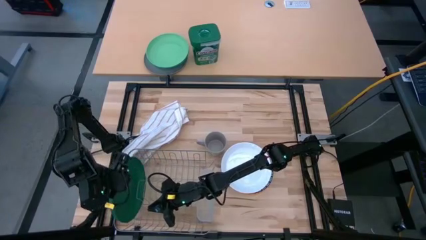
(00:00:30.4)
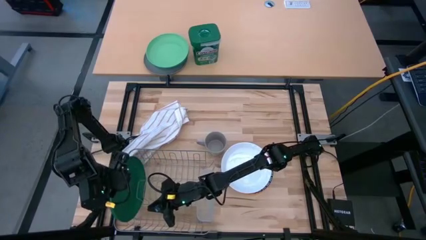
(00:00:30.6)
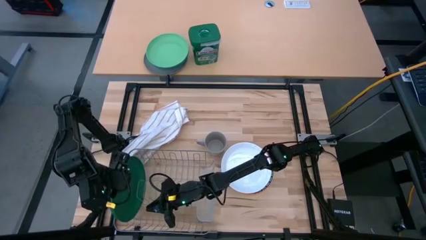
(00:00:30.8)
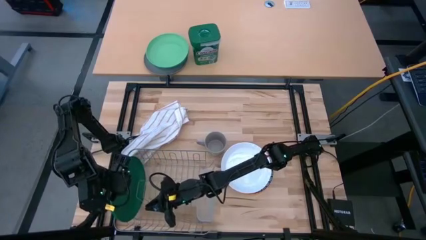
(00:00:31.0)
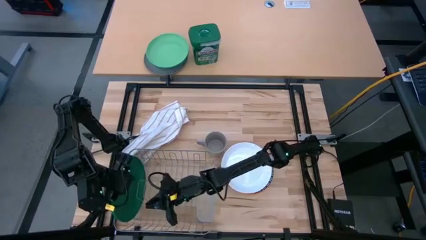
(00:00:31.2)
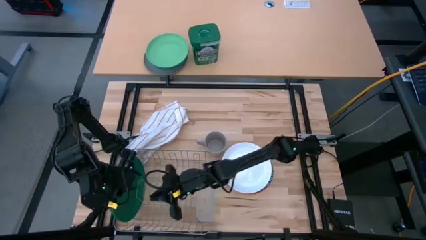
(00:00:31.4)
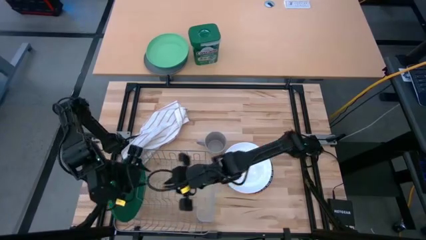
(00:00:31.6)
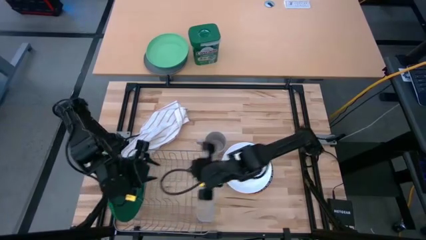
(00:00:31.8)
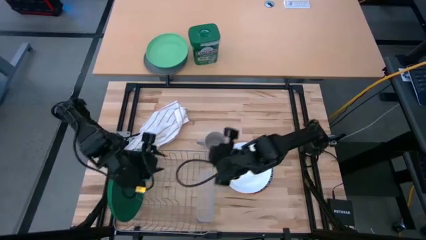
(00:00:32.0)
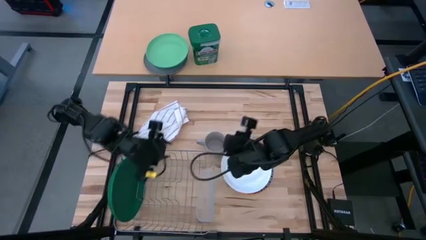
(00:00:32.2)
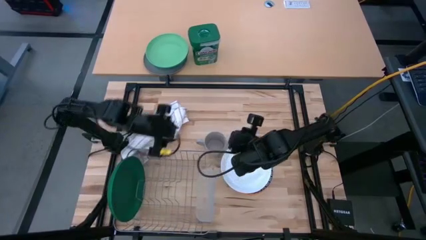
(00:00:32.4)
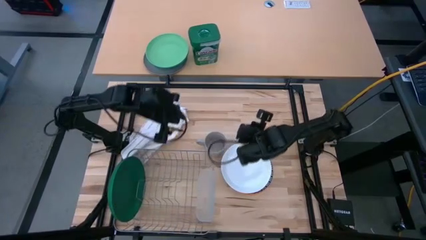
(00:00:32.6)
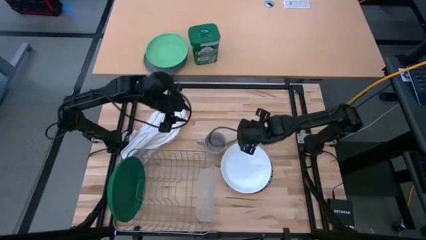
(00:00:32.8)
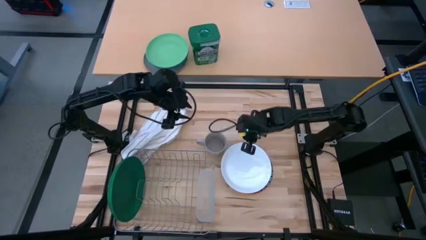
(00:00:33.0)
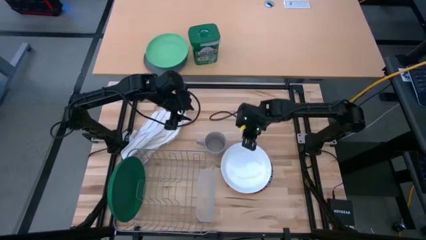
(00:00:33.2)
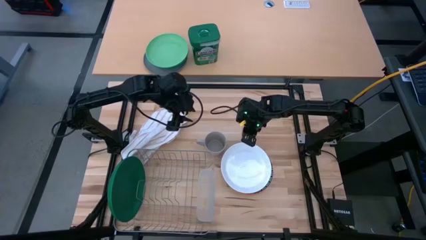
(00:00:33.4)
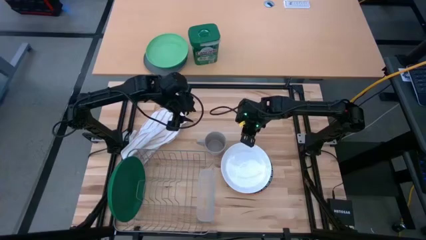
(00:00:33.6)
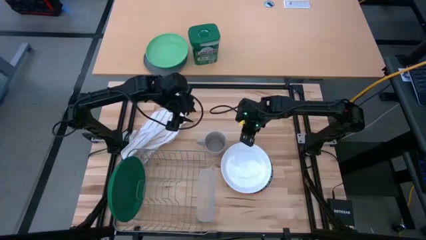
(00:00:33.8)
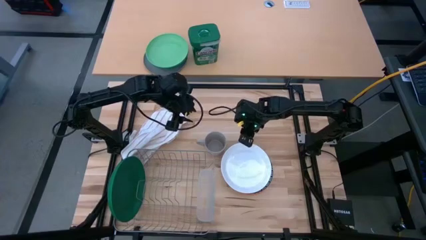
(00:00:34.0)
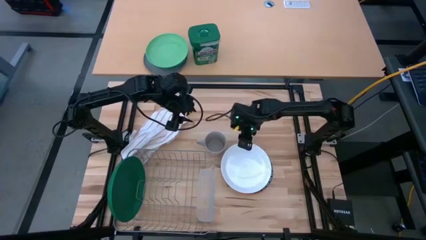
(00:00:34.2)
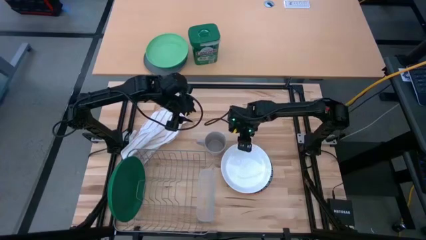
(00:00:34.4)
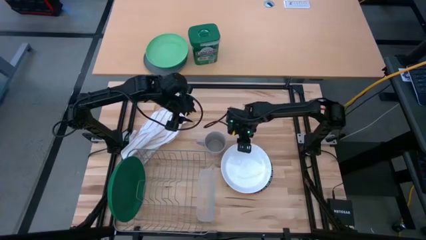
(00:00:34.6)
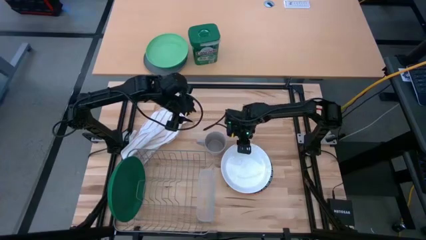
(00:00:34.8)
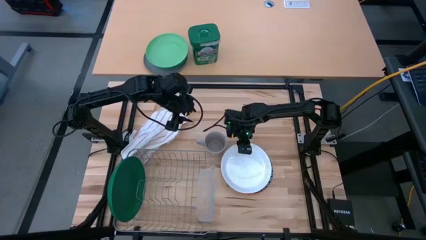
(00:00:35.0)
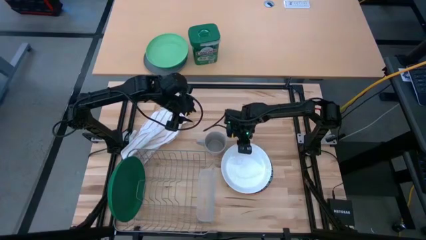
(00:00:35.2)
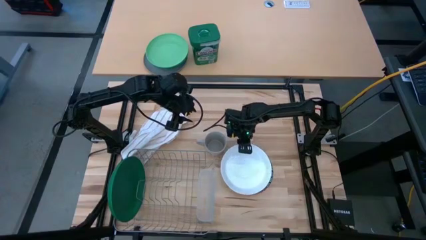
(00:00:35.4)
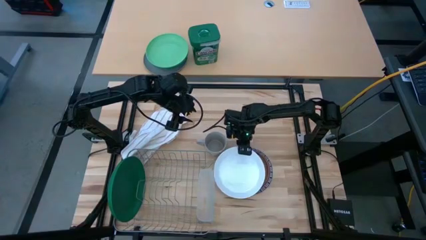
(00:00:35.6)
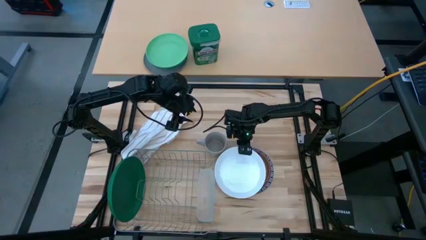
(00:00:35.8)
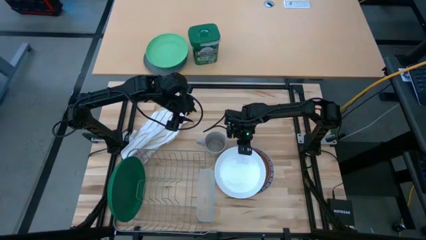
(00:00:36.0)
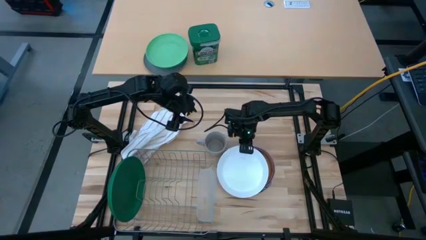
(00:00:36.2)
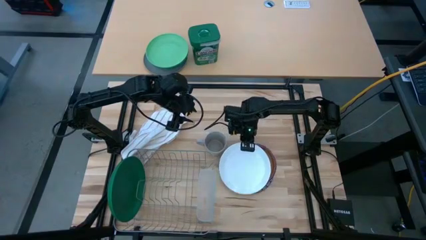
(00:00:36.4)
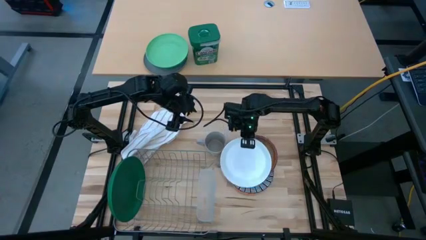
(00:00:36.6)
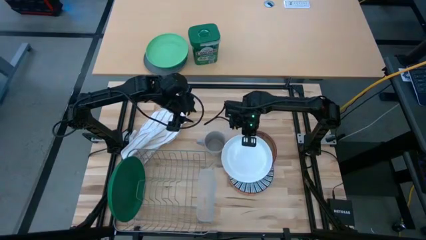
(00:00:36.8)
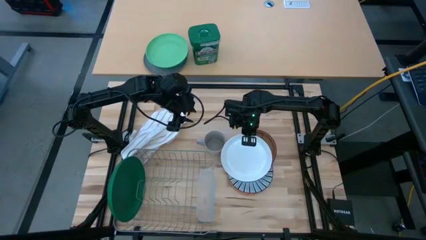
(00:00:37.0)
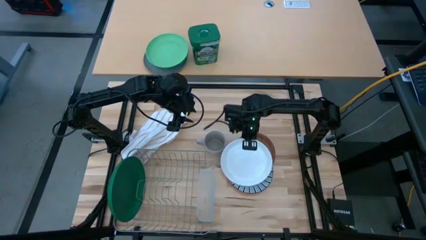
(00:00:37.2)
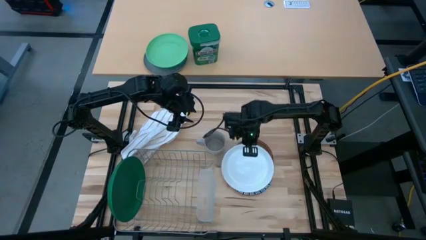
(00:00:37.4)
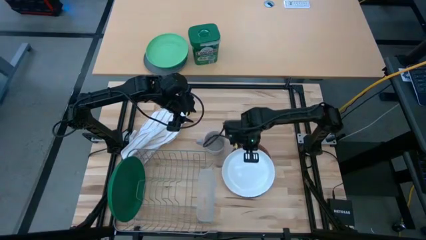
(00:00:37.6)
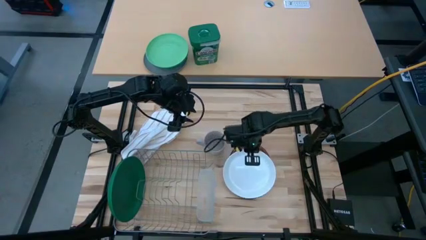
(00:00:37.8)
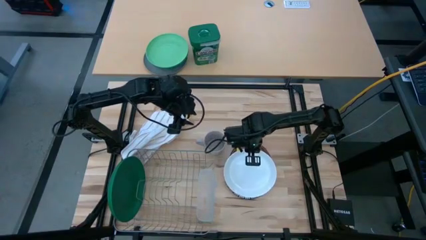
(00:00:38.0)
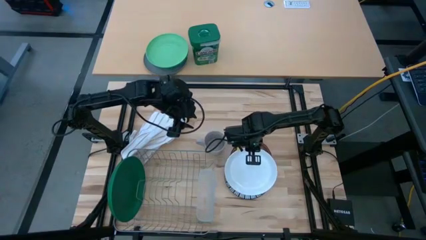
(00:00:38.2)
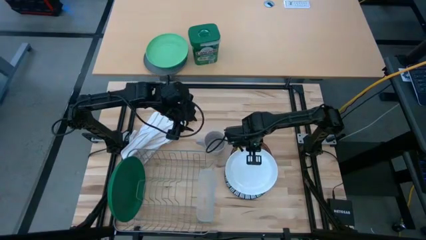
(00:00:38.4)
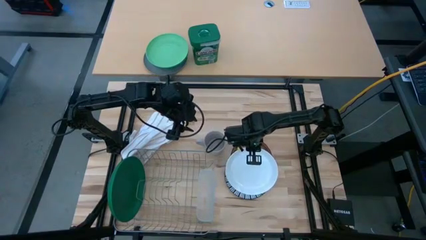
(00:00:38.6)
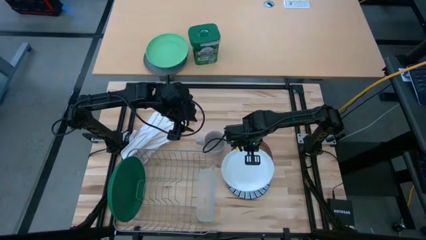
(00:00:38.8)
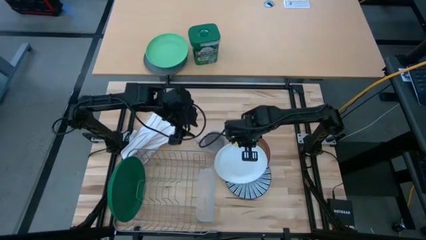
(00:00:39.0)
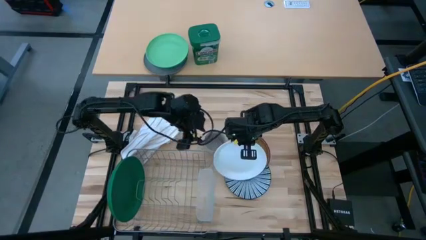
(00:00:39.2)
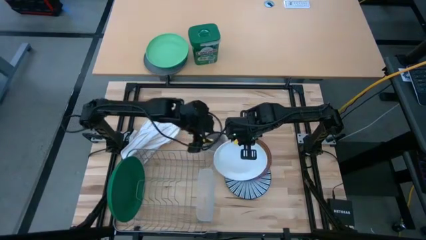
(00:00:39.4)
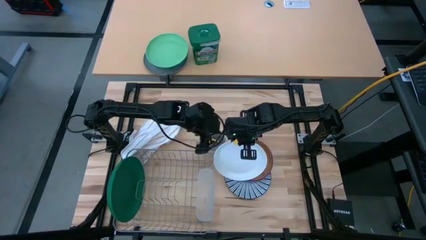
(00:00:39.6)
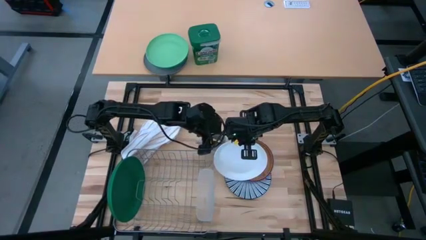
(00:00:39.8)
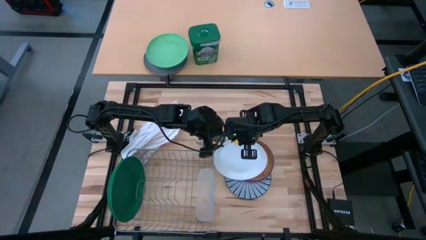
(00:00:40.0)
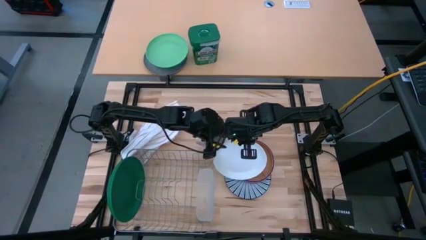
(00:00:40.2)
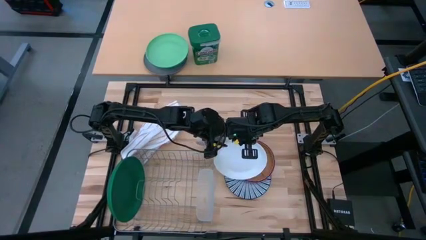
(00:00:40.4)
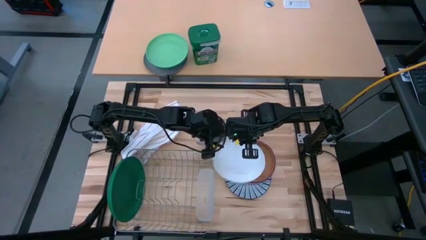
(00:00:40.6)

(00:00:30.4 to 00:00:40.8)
Task: Sort dishes
Put the white plate into the dish rack
